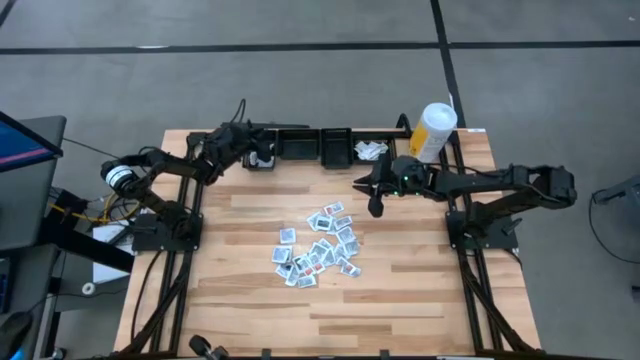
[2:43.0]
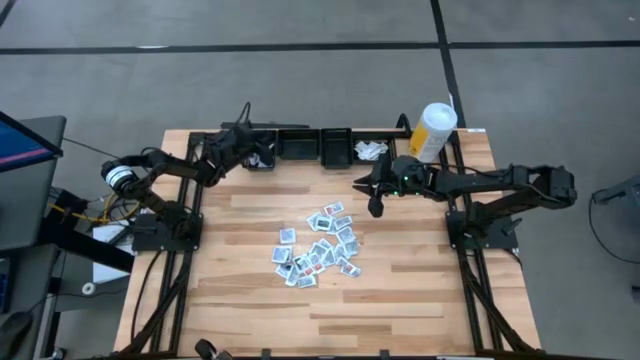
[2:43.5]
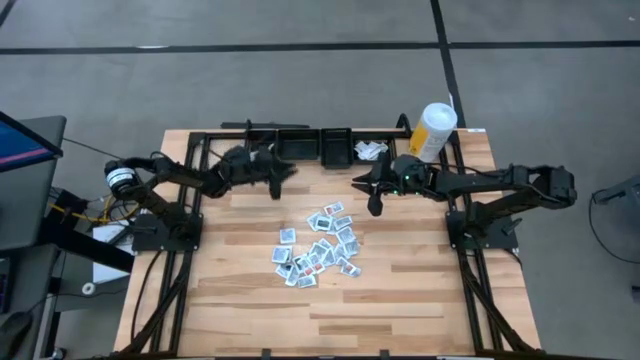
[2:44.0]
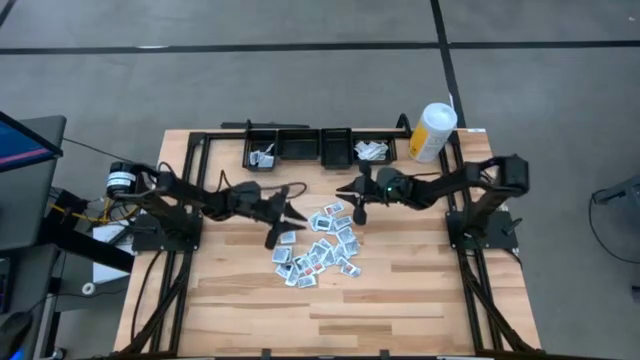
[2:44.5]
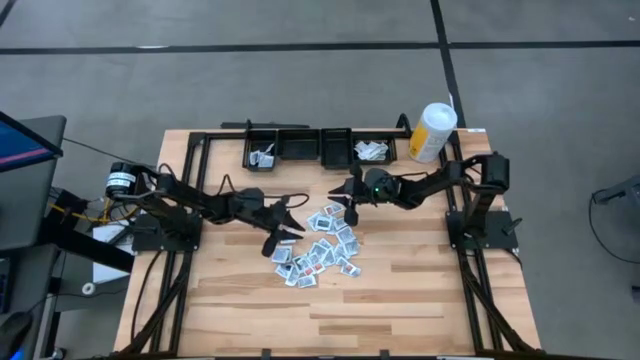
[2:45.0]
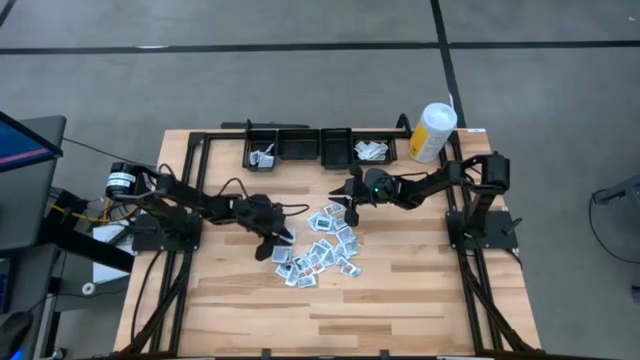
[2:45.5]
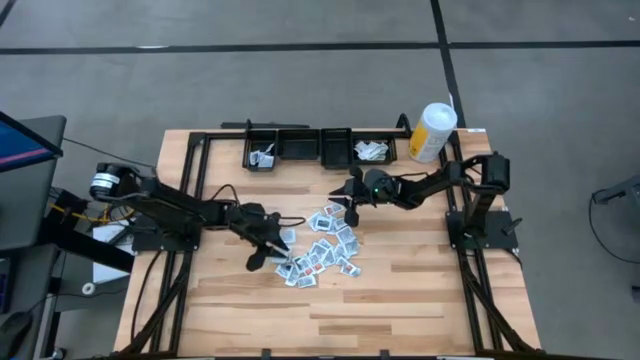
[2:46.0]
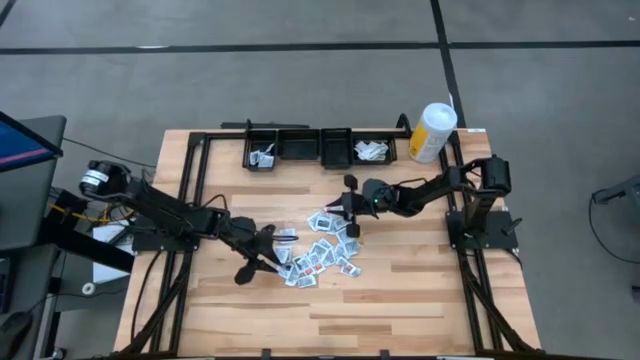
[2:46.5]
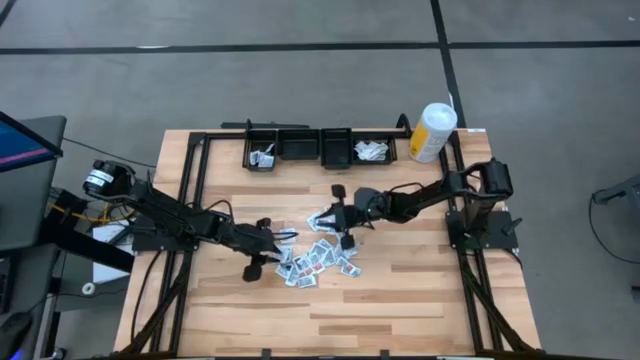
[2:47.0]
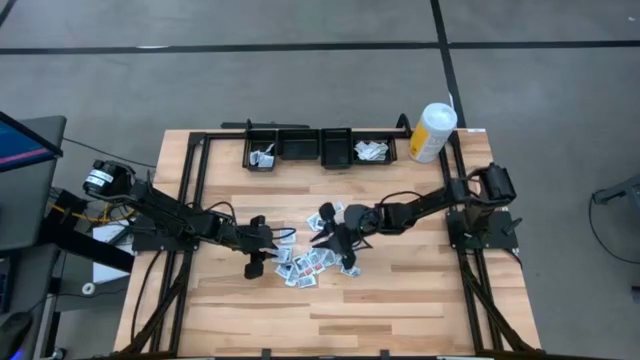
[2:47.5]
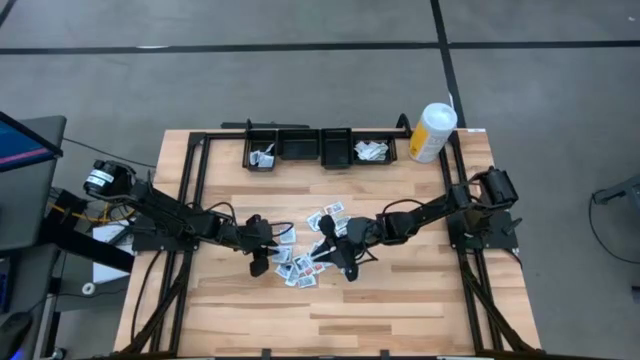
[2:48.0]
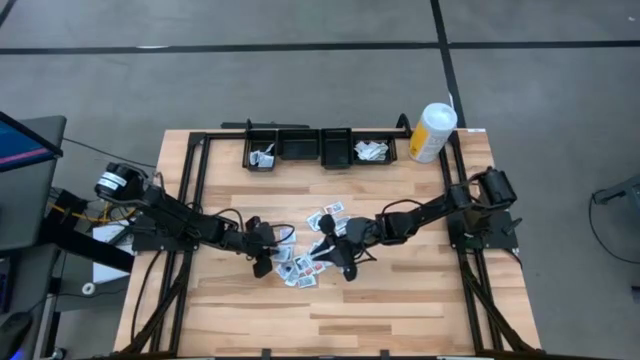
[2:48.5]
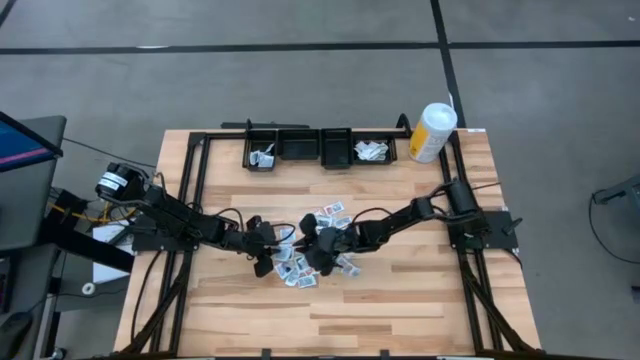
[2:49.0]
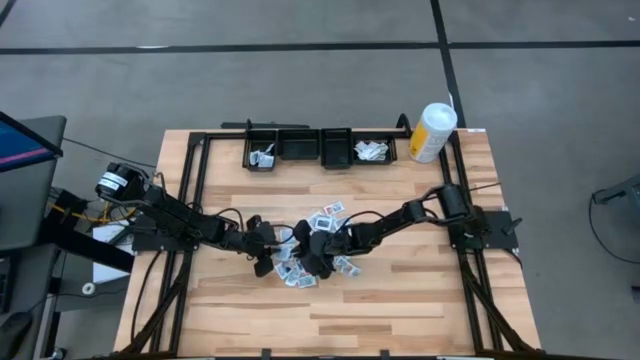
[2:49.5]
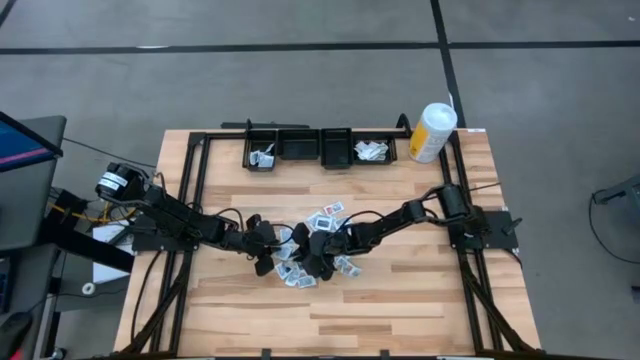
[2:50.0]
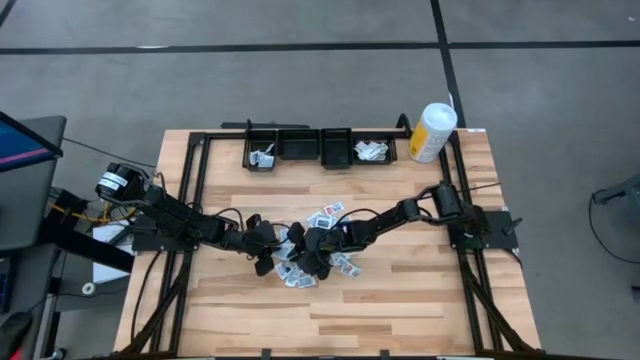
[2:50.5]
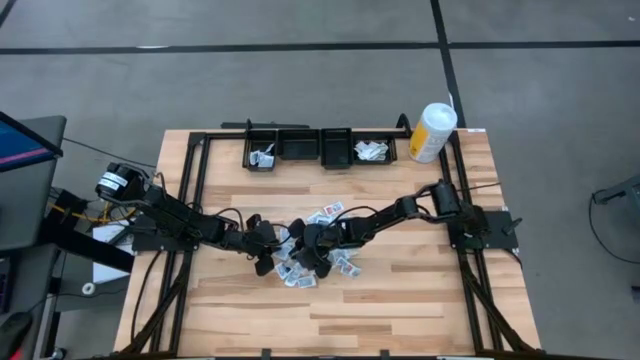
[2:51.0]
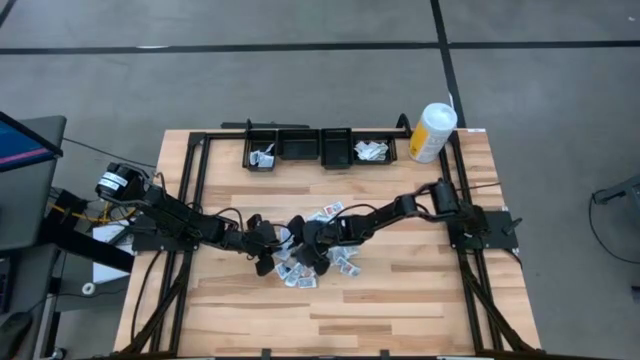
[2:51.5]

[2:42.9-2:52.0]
Task: Pick & Place First Aid Supplies
Put the blue alcohol pad into the left black bin

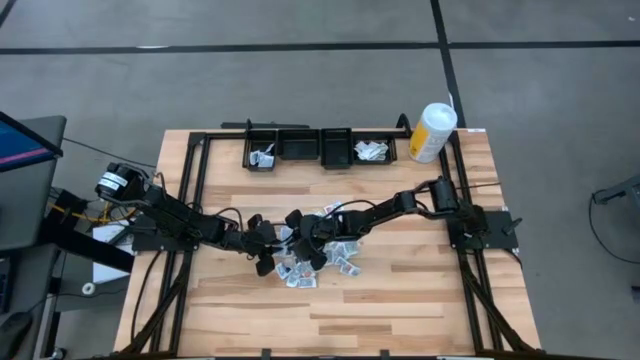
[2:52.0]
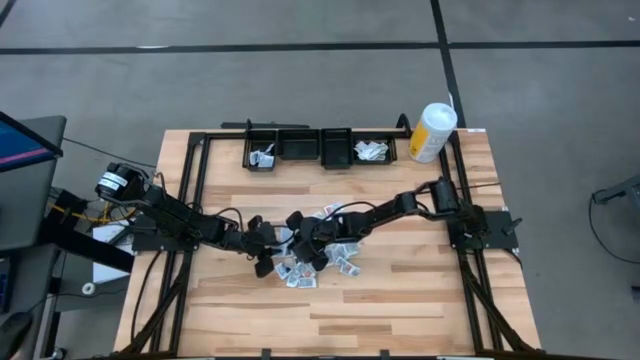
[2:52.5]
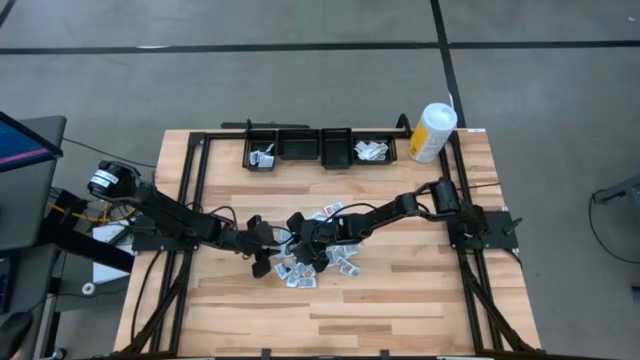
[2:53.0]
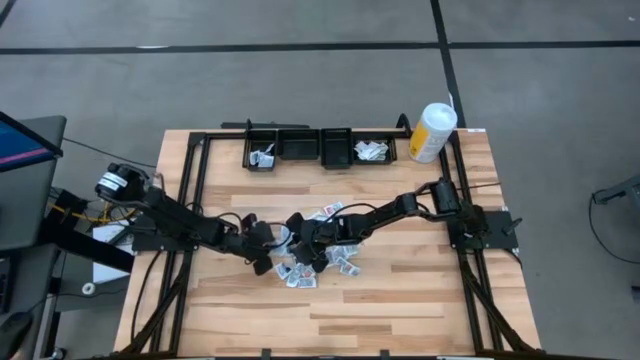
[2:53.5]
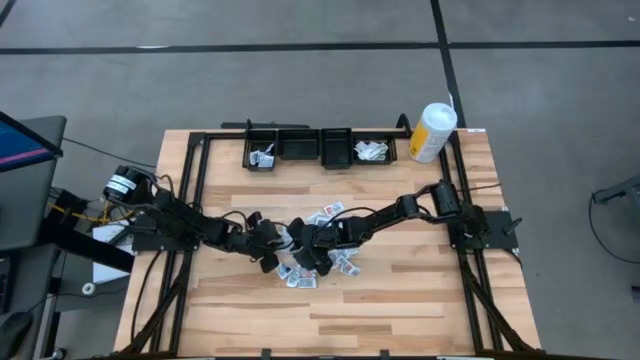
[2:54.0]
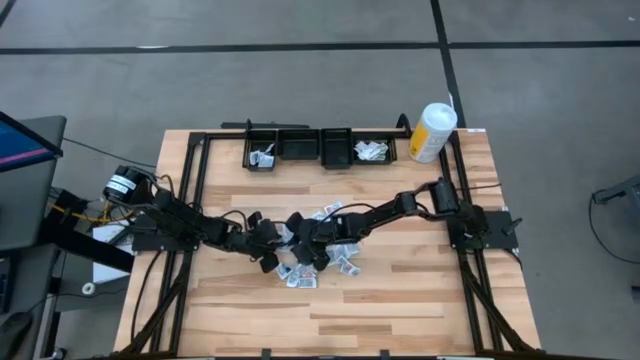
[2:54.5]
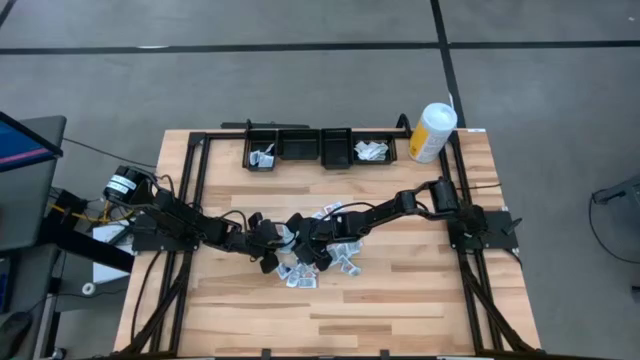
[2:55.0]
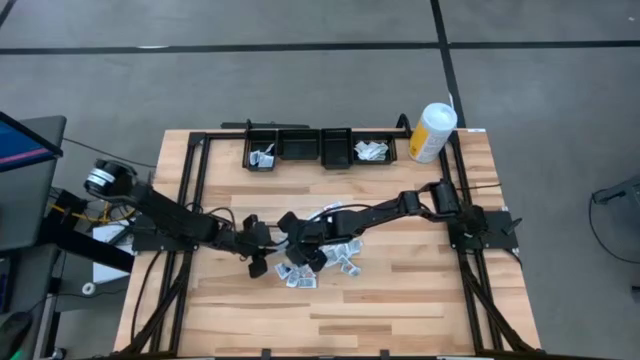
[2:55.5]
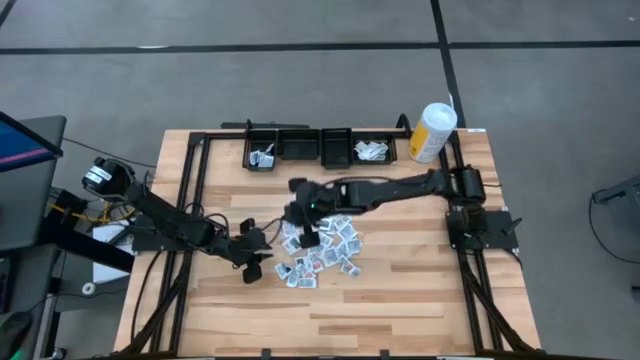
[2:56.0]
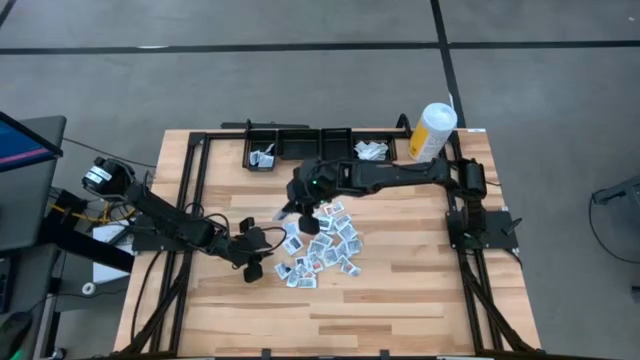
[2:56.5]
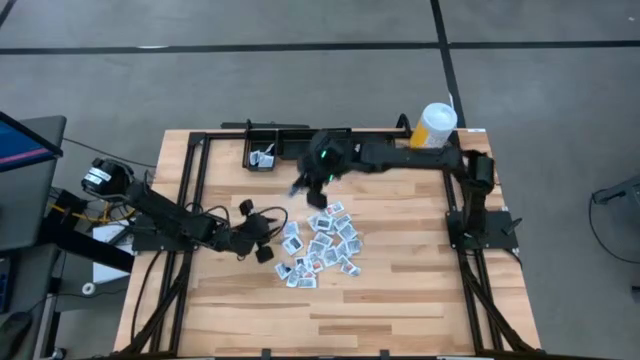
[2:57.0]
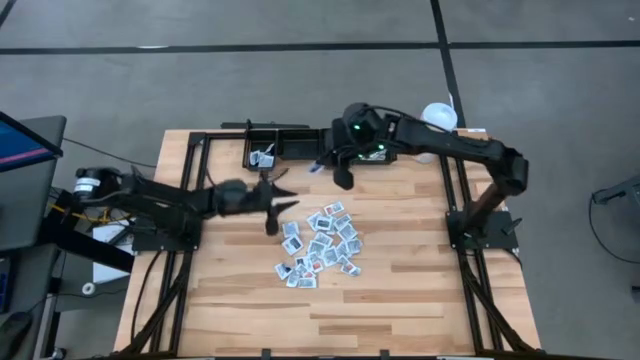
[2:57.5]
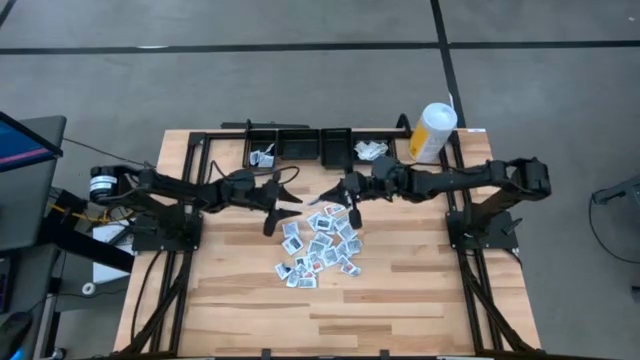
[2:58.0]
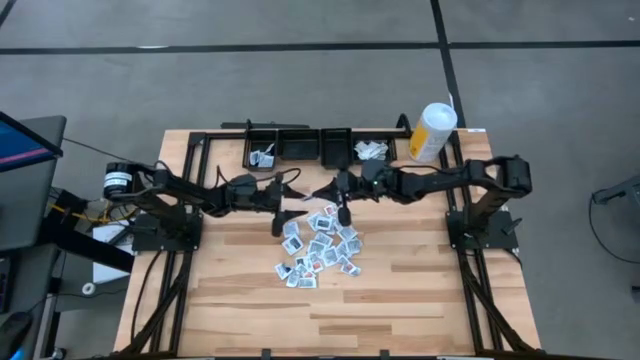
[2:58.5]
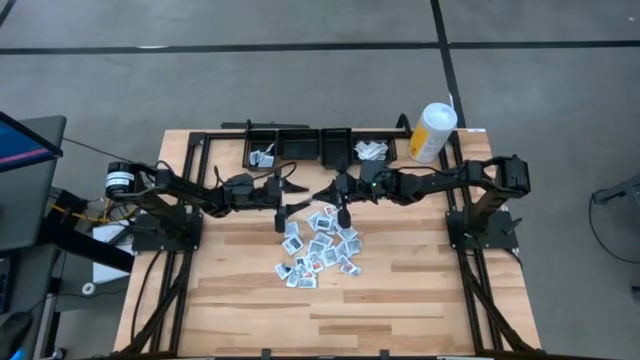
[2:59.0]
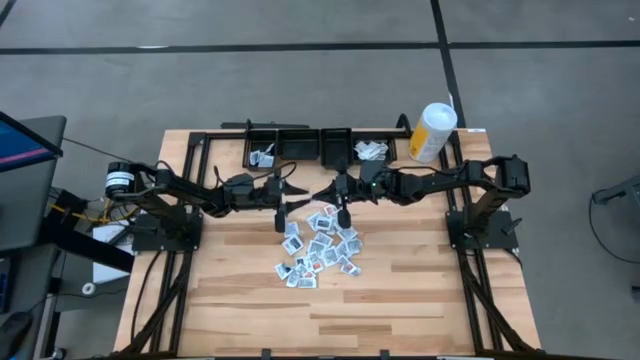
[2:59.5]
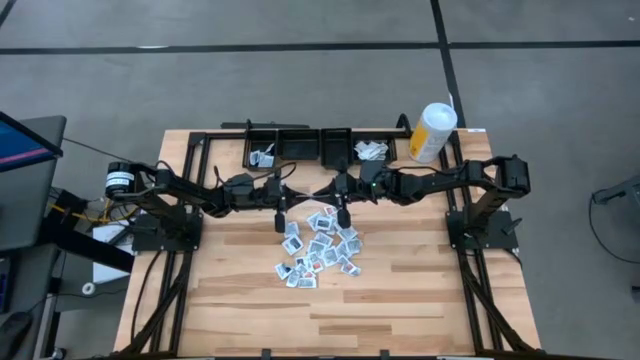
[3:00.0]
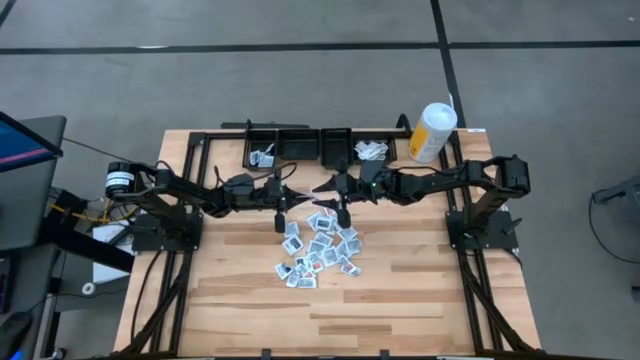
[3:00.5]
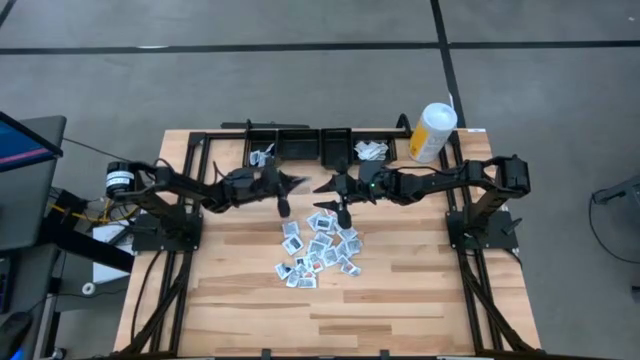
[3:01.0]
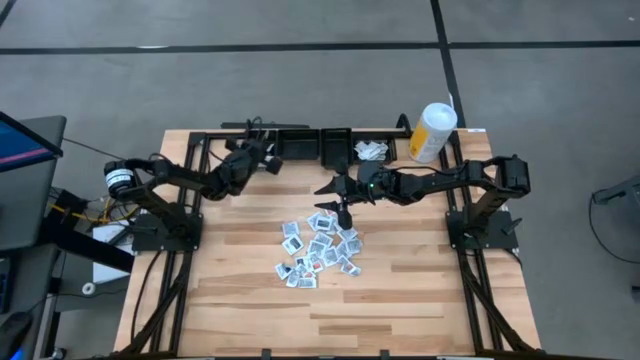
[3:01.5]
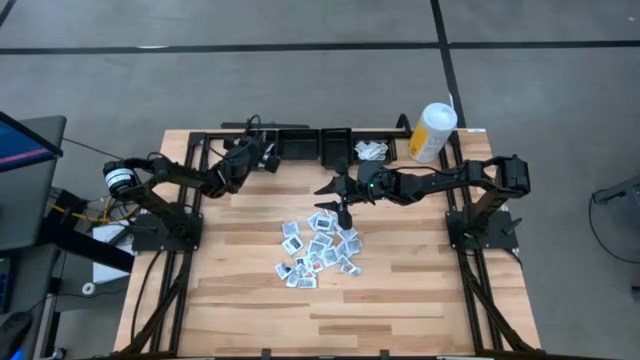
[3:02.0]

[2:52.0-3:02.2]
Put the blue alcohol pad into the left black bin

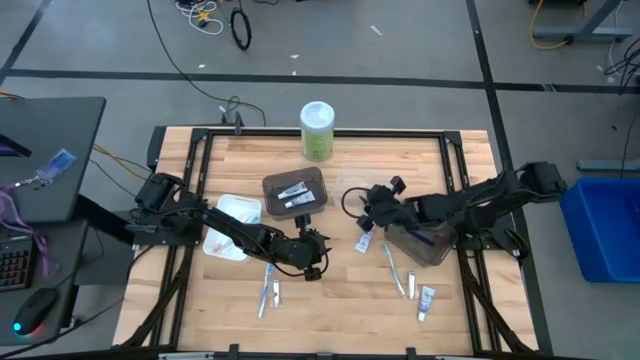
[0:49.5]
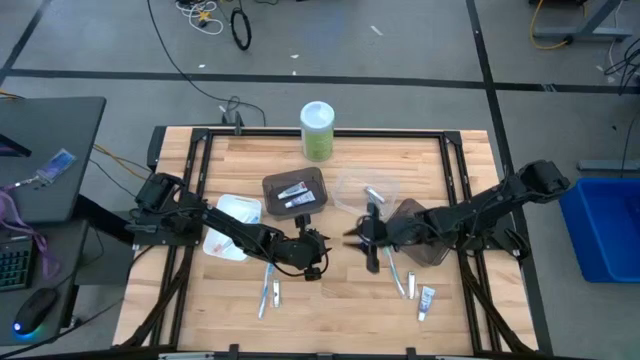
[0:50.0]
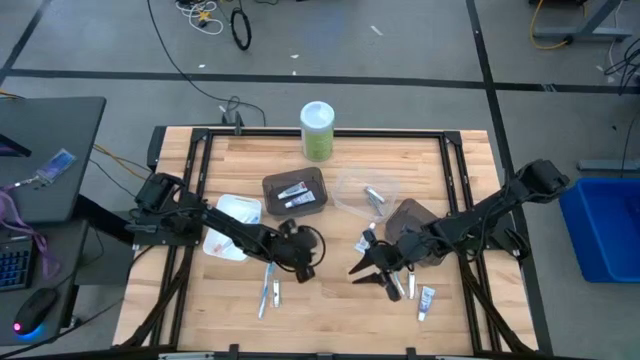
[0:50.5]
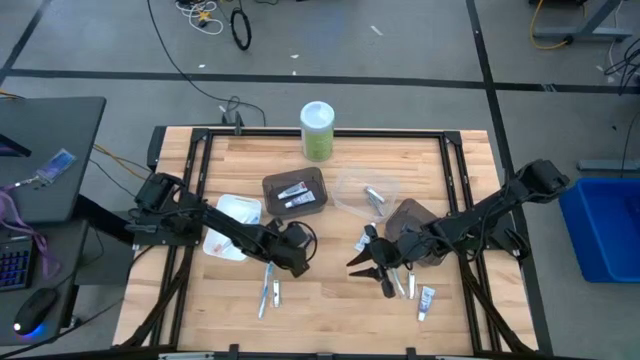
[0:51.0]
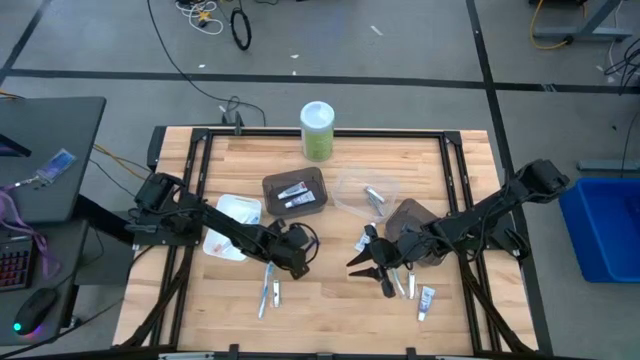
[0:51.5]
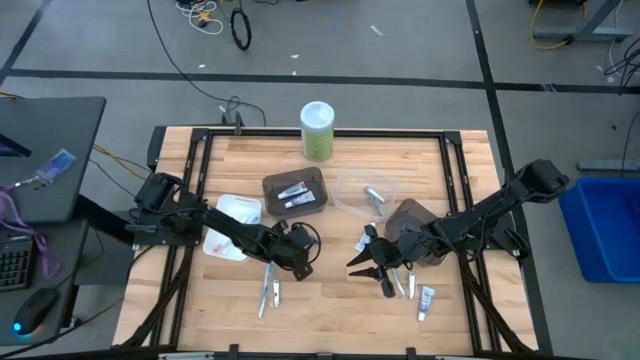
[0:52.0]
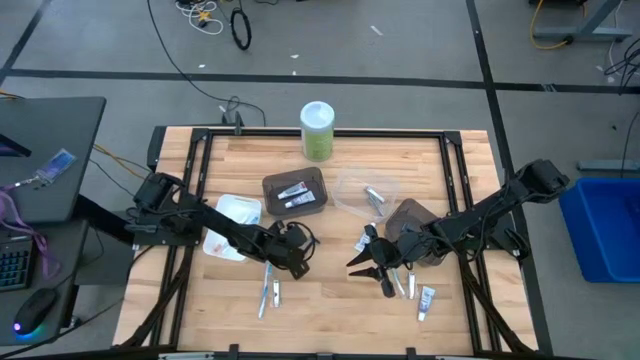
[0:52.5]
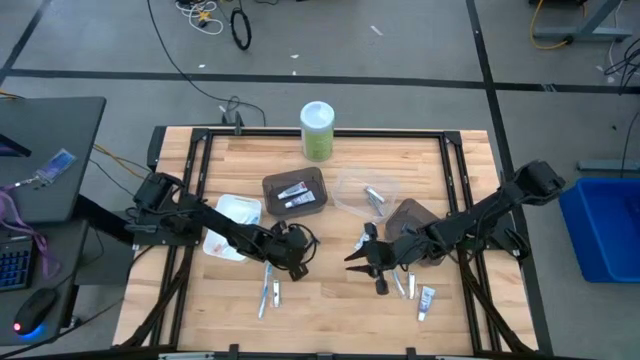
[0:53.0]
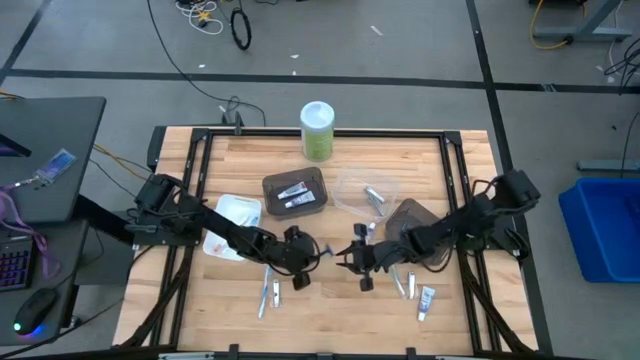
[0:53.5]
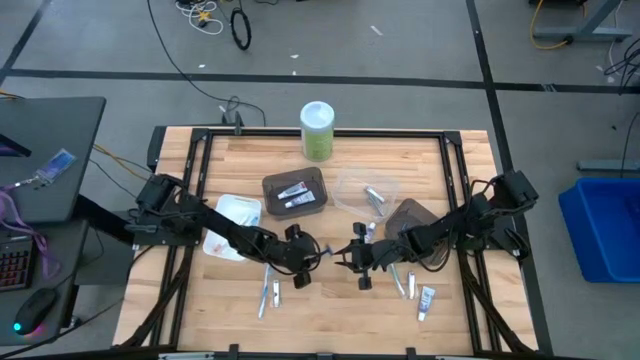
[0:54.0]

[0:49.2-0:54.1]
Task: Pick & Place Travel size toiletries
Put the razor into the right black bin
